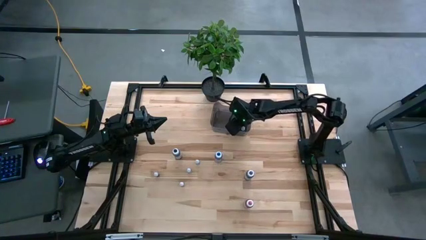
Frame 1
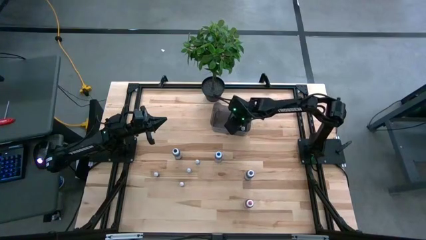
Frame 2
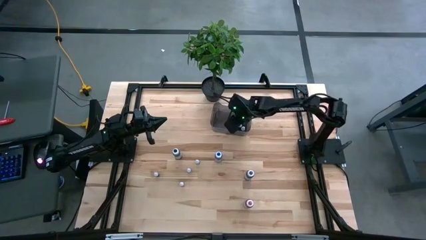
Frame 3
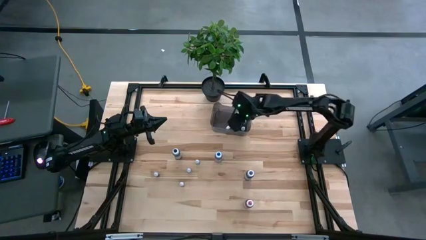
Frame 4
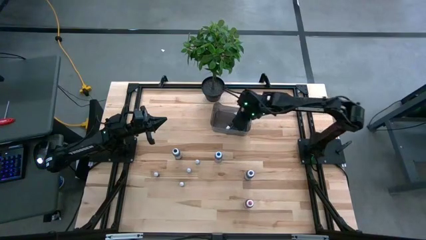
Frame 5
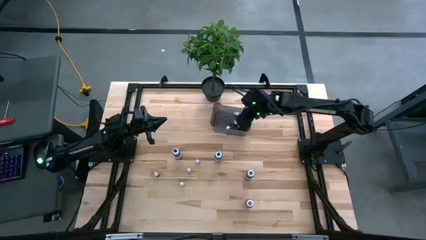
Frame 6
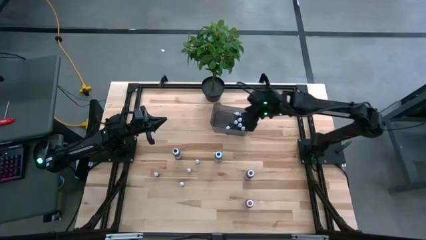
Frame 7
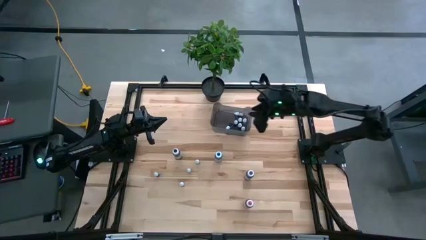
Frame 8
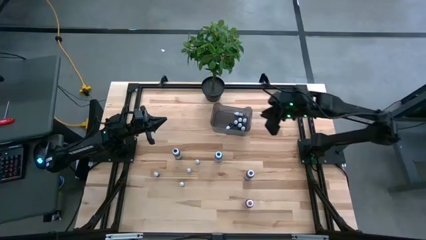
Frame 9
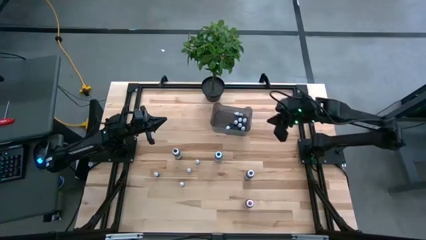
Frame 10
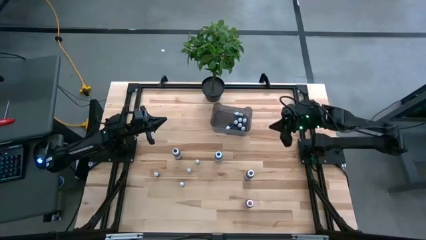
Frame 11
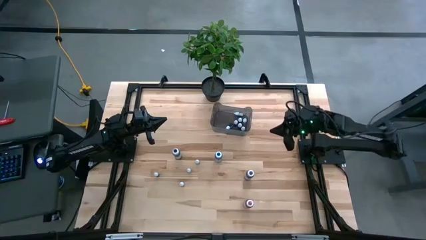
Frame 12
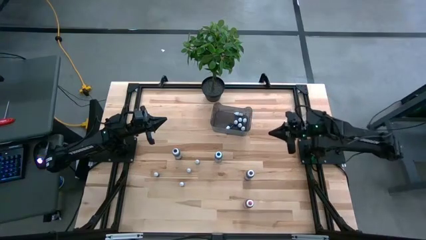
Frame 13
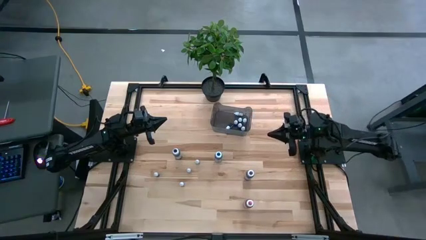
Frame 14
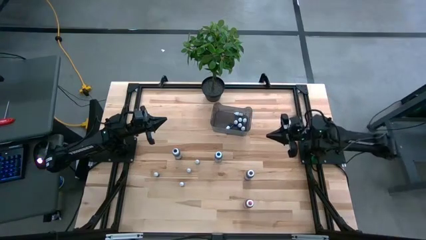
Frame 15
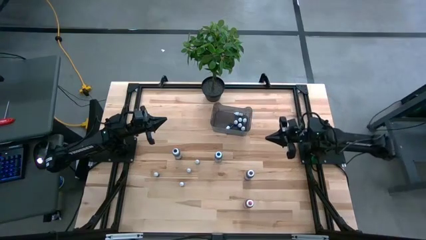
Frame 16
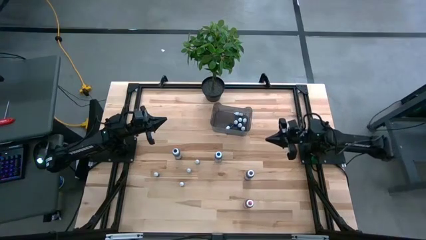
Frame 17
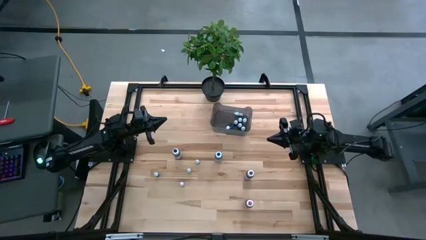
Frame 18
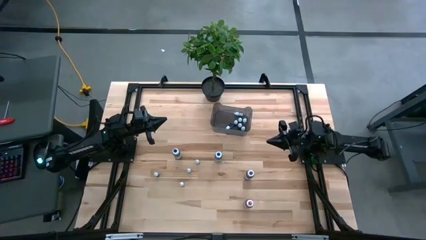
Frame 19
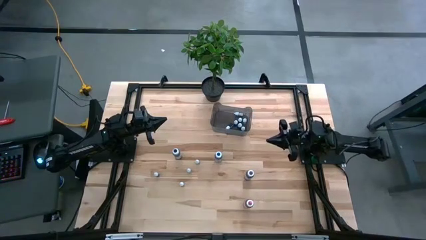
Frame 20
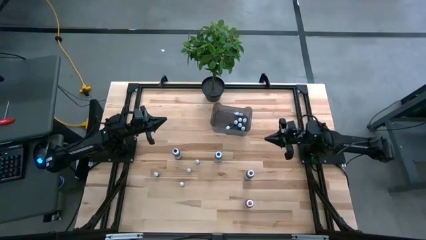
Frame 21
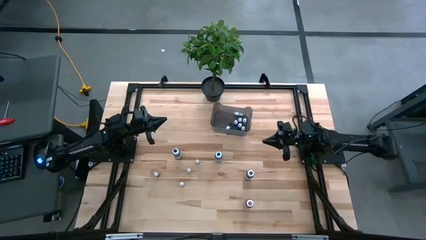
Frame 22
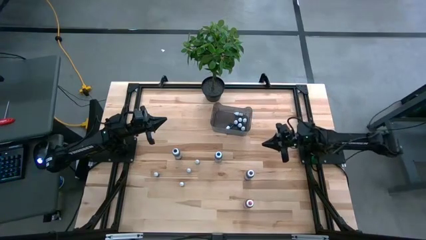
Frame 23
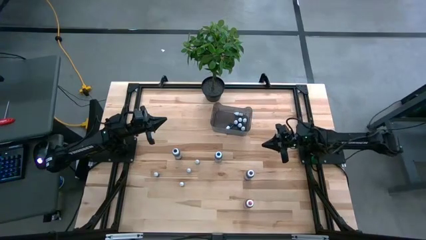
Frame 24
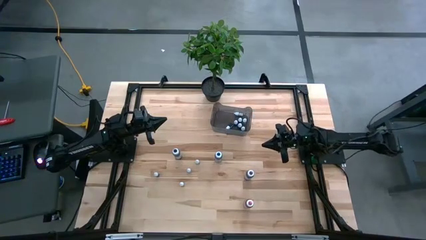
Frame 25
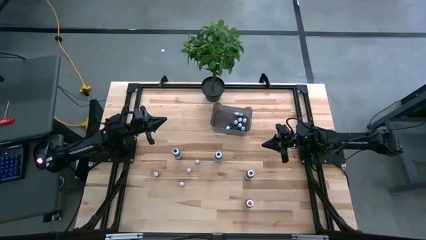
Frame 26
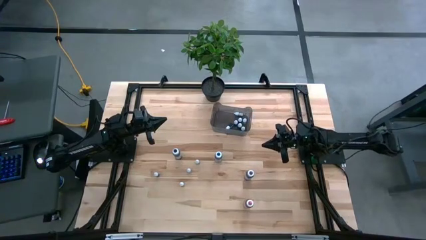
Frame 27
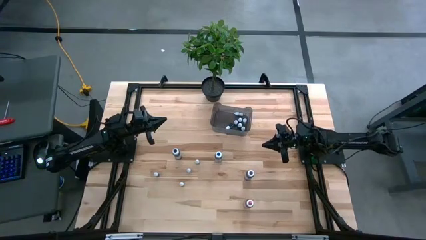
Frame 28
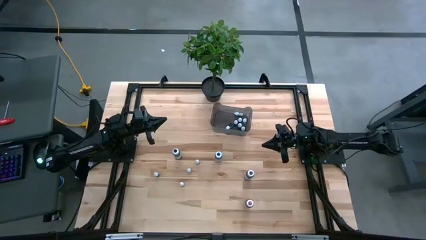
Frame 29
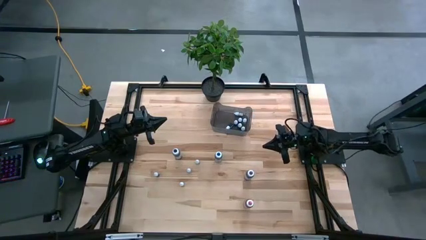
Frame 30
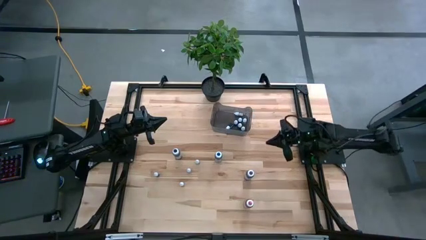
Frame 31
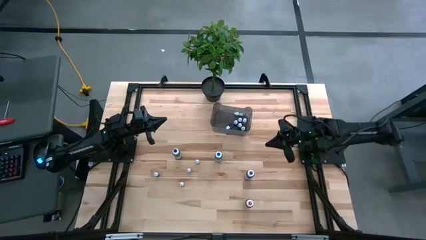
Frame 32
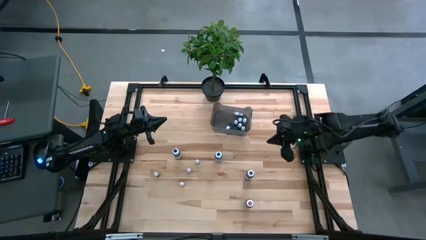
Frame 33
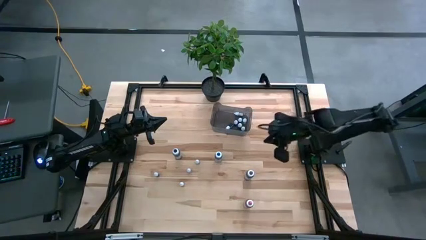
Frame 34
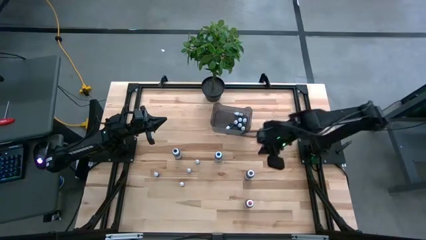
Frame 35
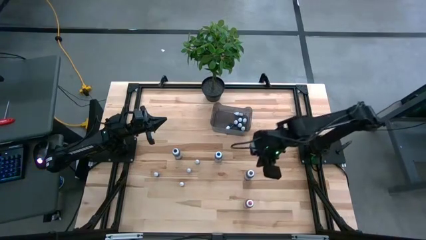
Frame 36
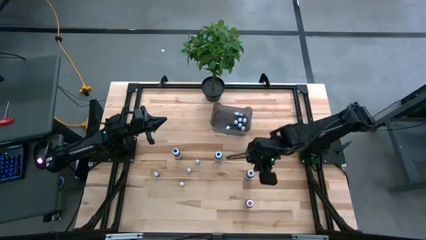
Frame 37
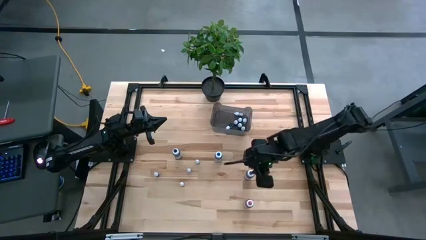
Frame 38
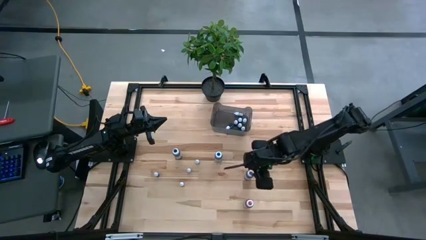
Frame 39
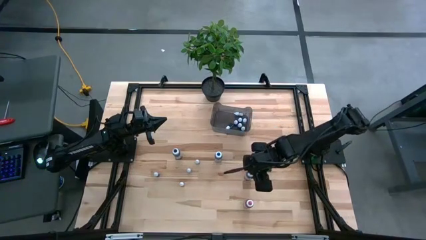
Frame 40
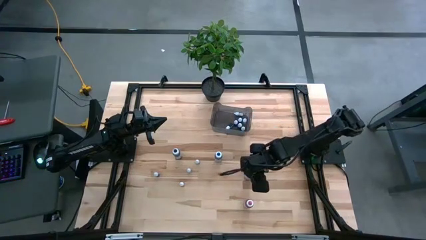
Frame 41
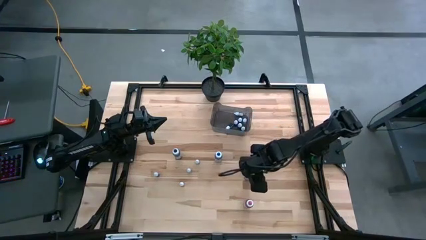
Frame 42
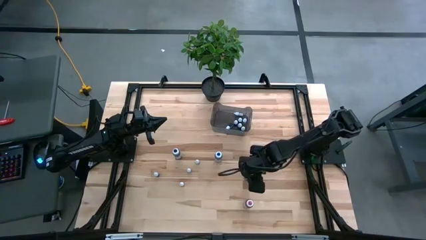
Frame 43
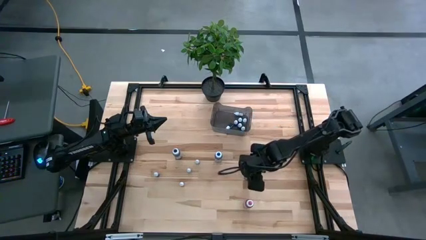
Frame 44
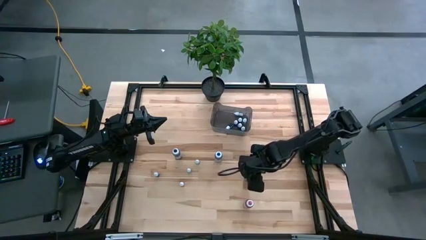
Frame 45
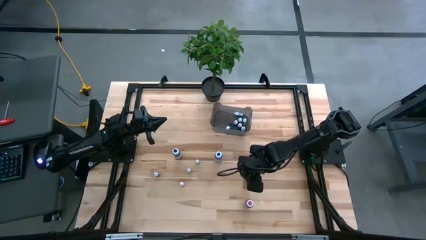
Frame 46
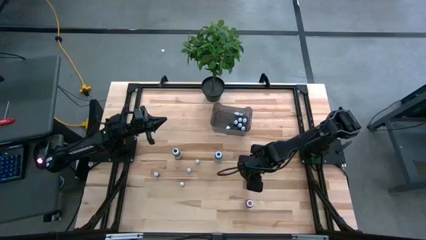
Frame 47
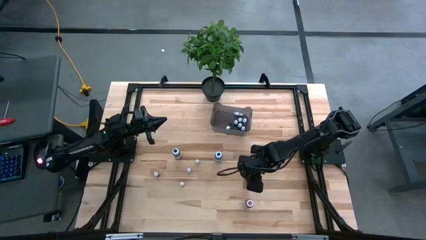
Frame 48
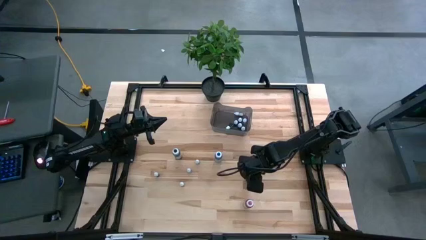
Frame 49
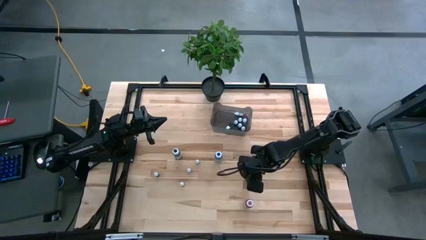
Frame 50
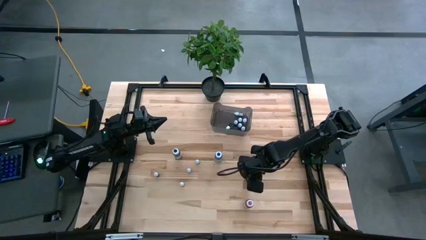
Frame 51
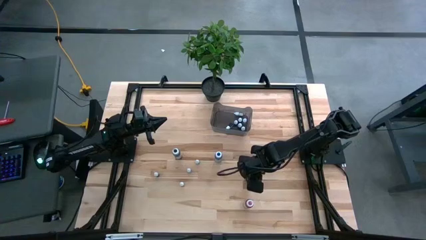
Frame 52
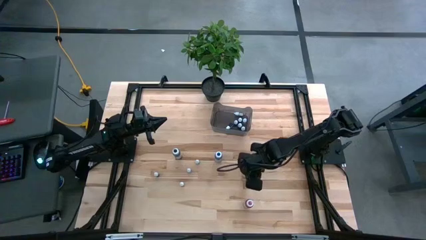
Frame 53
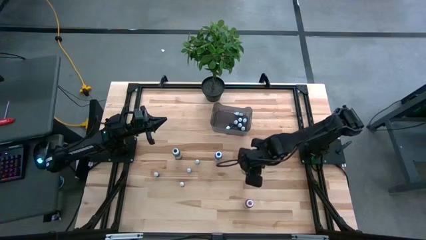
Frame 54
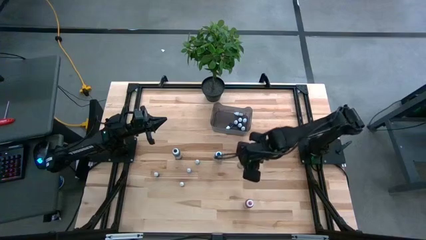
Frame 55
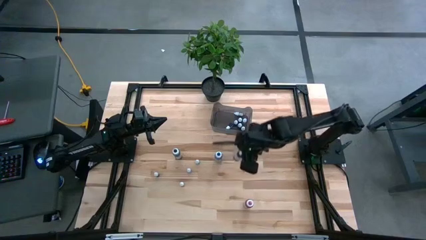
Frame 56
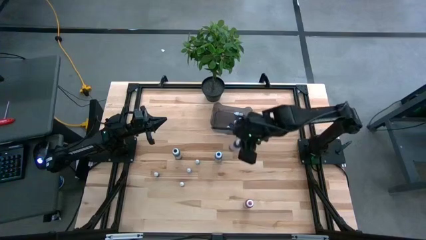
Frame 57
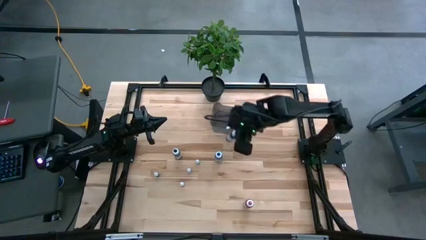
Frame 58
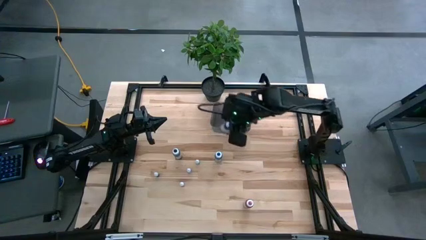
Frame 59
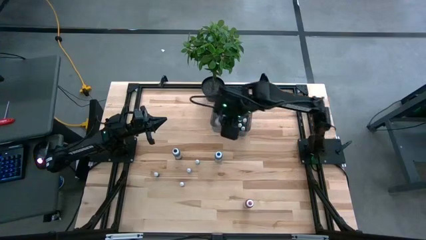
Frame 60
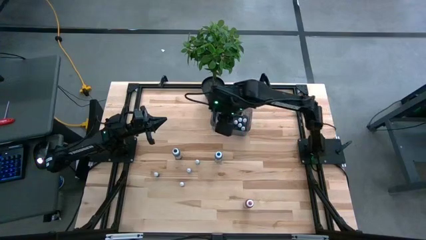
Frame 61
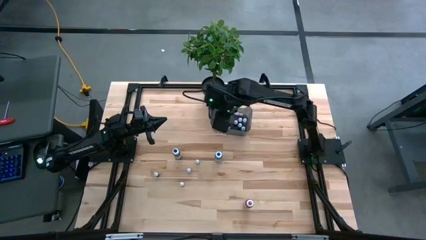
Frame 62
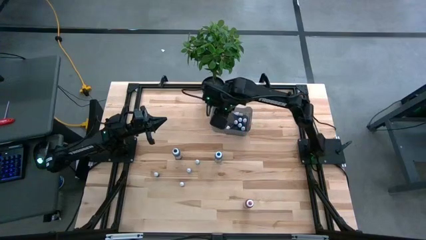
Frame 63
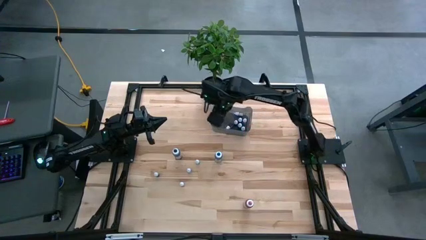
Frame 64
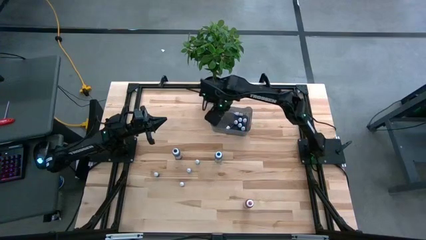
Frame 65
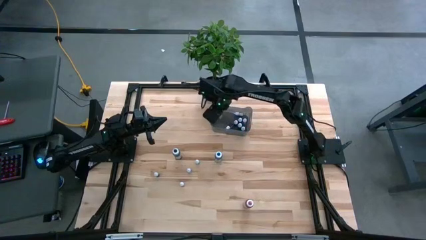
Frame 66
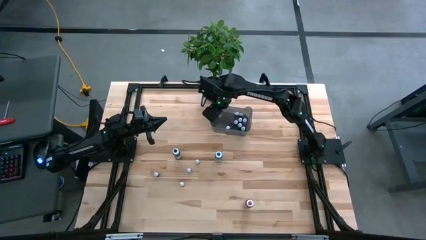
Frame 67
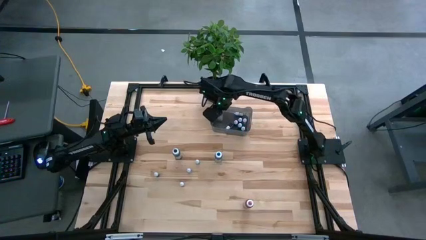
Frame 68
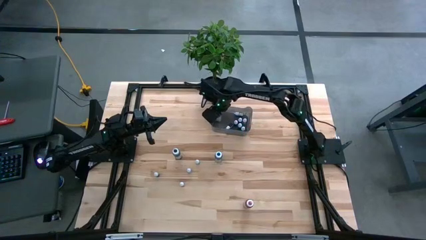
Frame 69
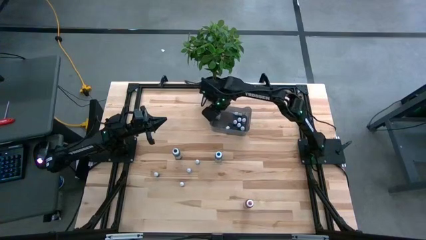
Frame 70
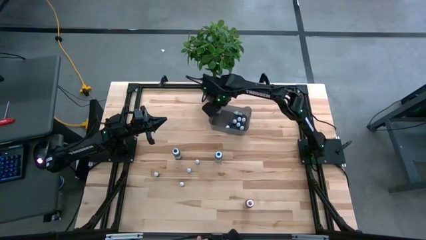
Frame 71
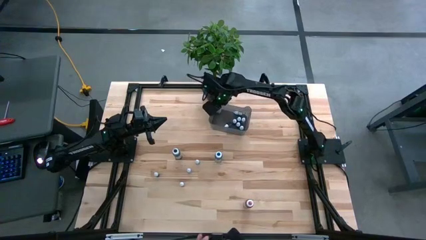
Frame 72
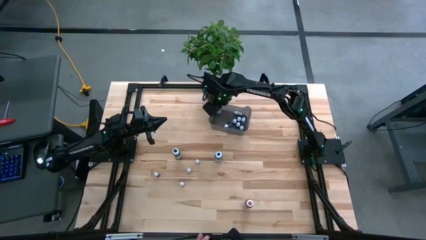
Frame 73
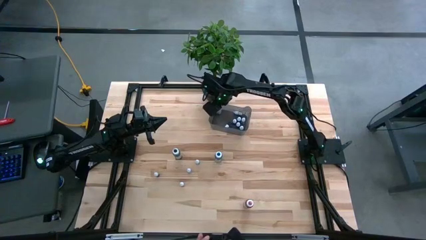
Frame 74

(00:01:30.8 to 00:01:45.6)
Task: Pick & Place food coloring
Put the big purple food coloring bottle into the black bin

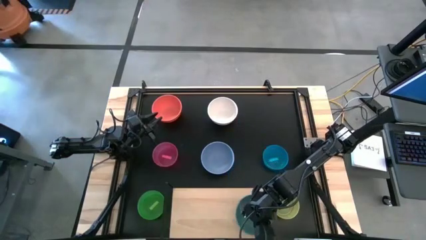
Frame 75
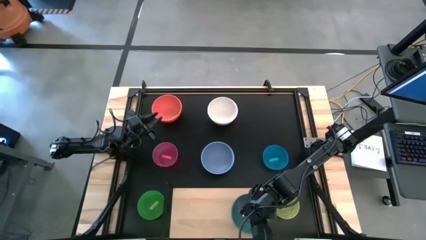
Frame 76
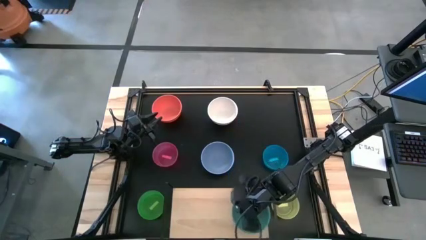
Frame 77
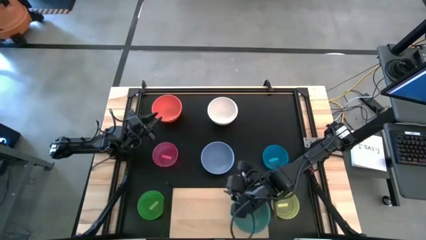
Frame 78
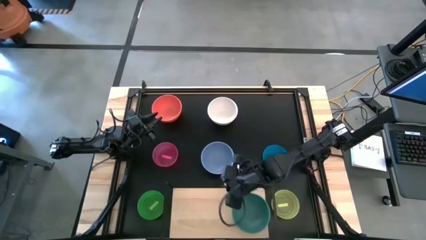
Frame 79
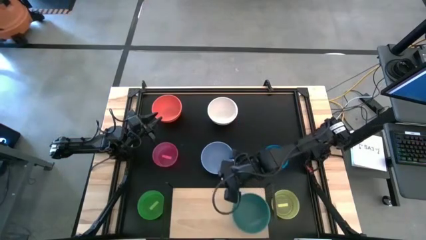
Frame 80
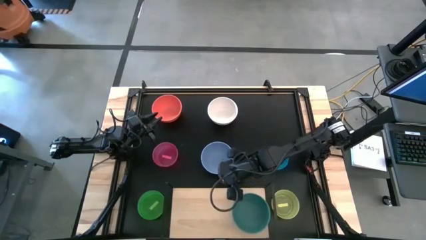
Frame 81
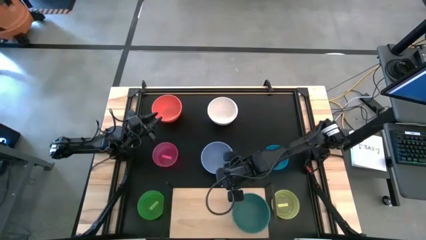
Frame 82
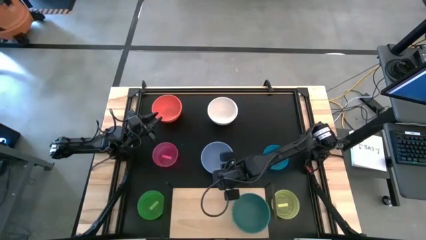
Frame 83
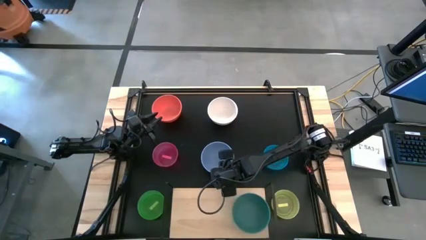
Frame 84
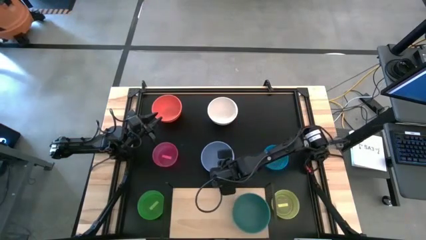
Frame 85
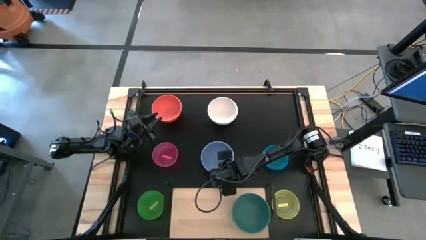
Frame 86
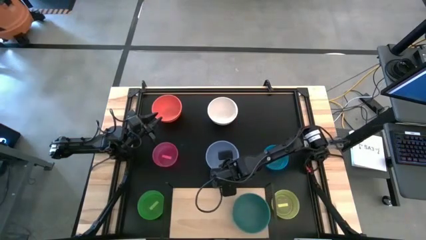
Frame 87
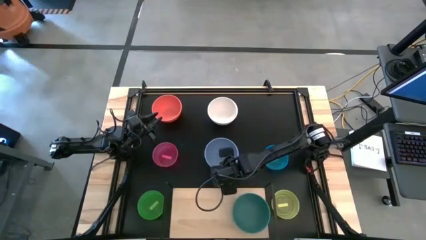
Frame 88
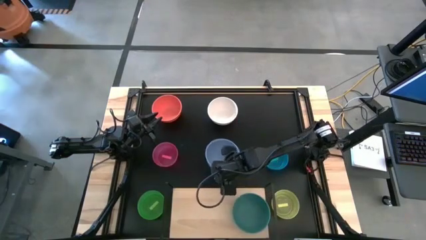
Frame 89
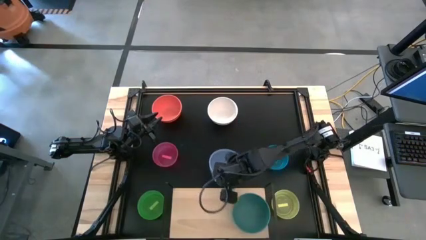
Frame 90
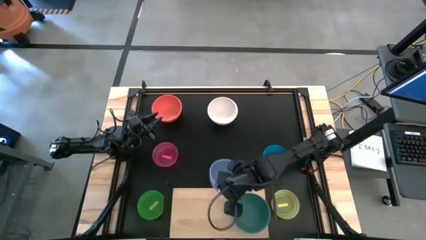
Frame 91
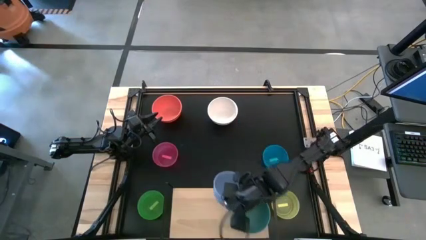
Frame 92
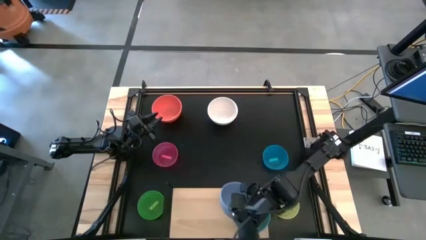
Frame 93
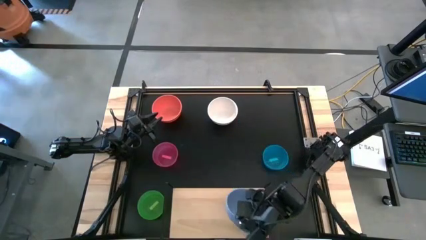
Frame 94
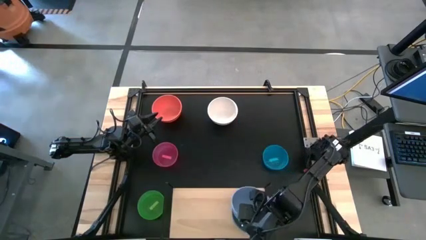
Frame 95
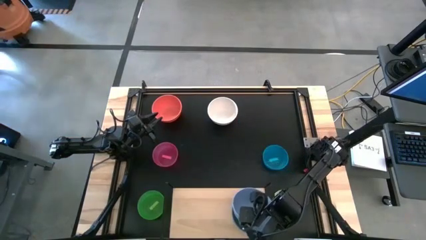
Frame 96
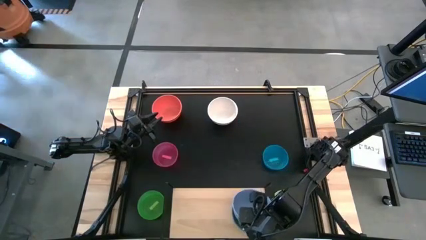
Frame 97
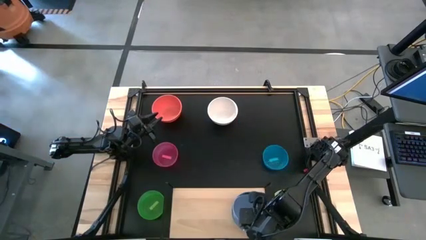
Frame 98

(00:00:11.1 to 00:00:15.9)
Task: Place and stack bowls onto a shelf
Stack the blue bowl on top of the dark green bowl on the shelf
